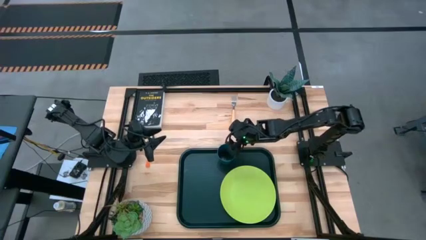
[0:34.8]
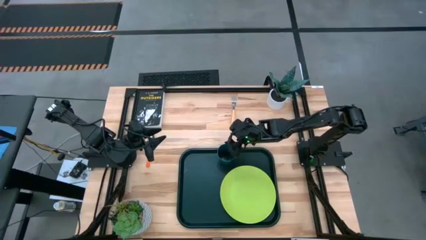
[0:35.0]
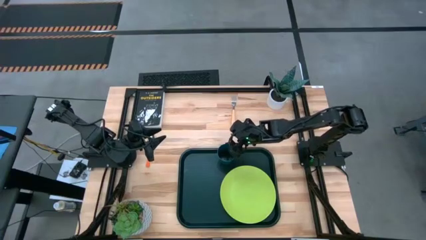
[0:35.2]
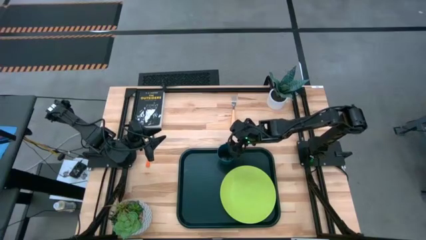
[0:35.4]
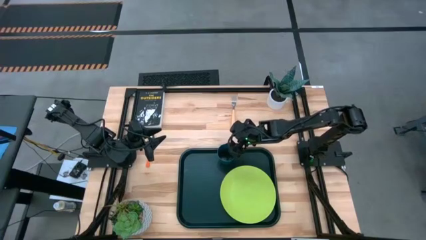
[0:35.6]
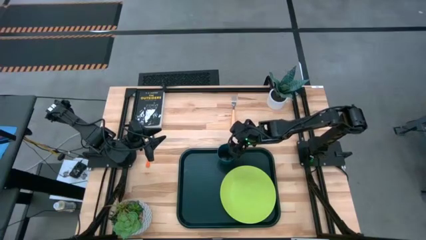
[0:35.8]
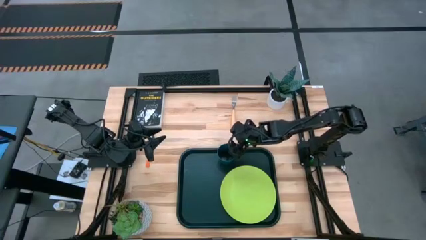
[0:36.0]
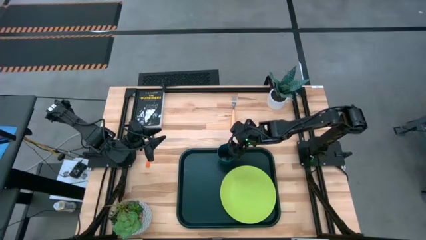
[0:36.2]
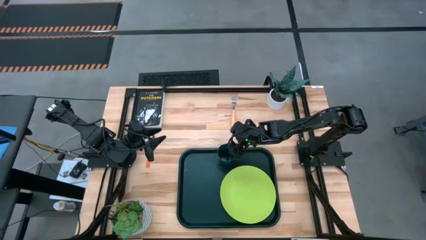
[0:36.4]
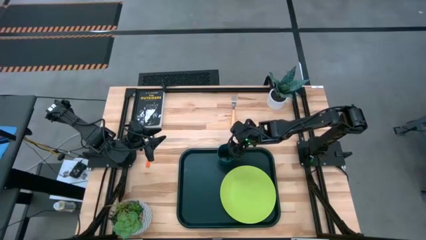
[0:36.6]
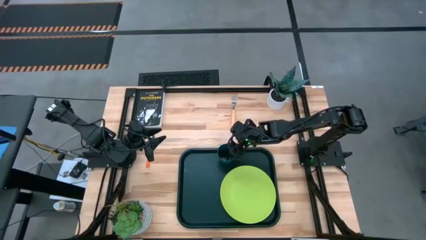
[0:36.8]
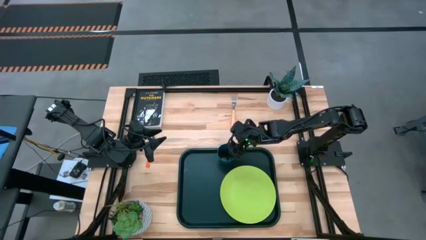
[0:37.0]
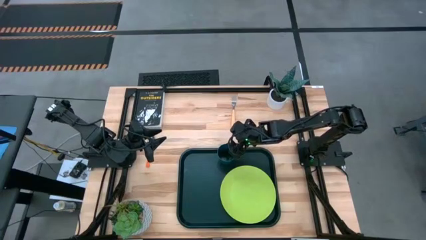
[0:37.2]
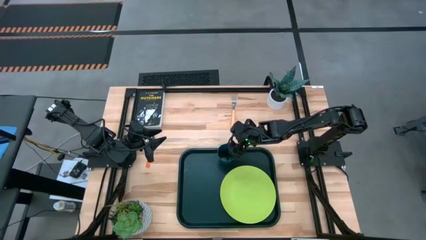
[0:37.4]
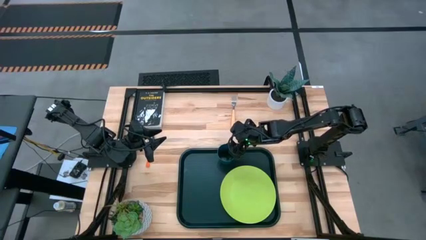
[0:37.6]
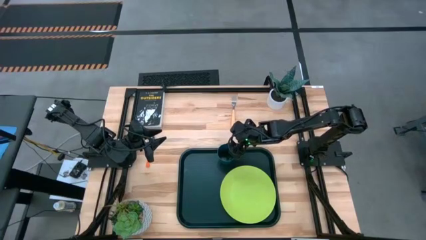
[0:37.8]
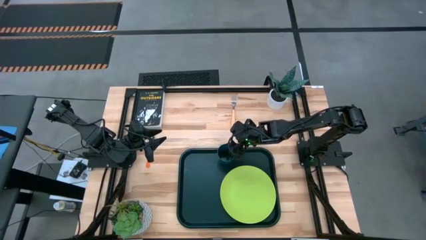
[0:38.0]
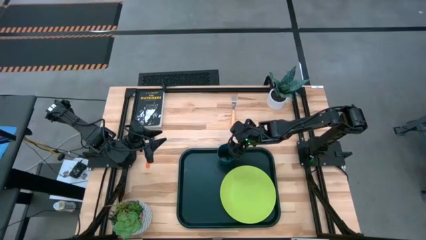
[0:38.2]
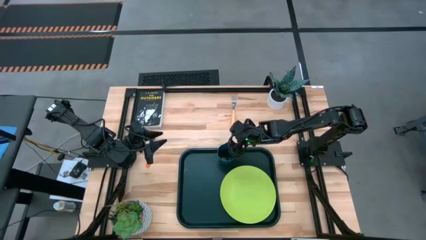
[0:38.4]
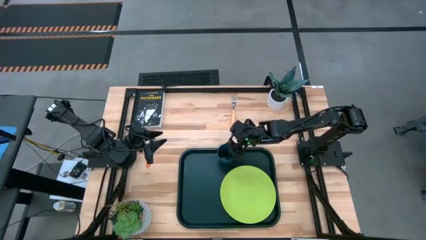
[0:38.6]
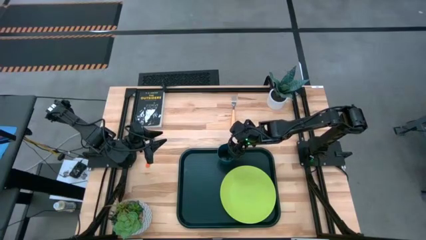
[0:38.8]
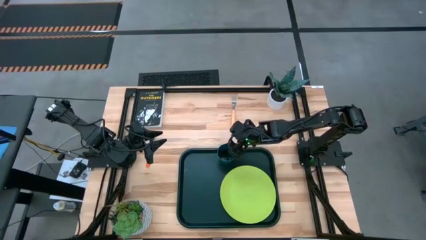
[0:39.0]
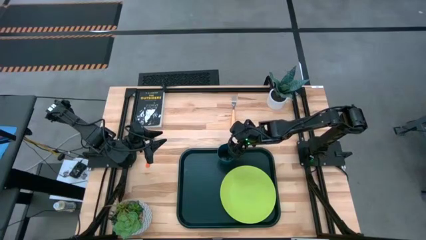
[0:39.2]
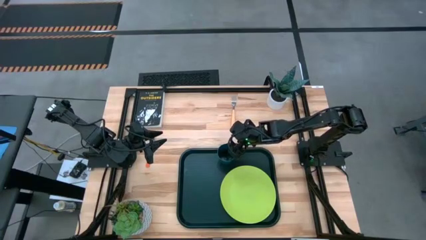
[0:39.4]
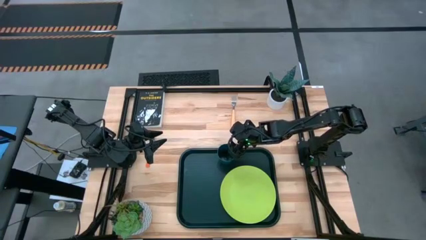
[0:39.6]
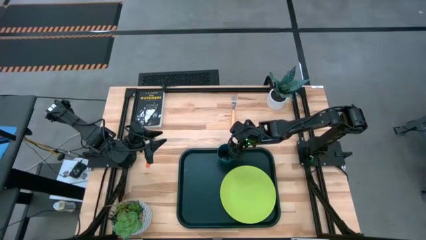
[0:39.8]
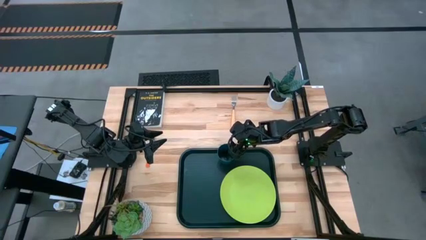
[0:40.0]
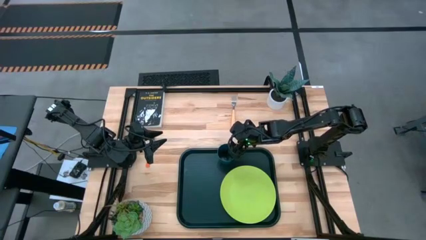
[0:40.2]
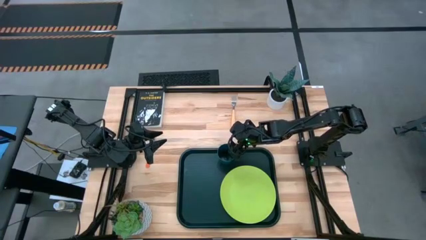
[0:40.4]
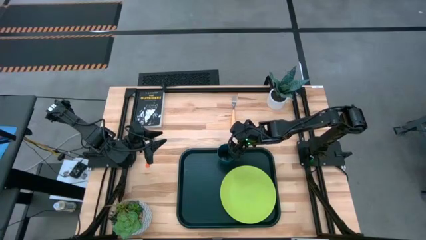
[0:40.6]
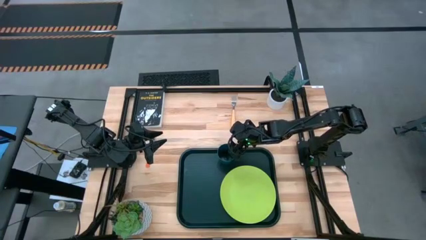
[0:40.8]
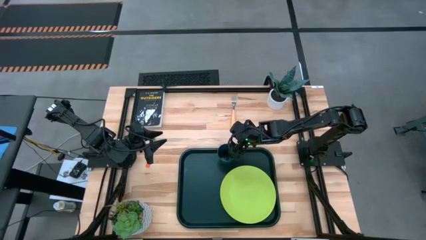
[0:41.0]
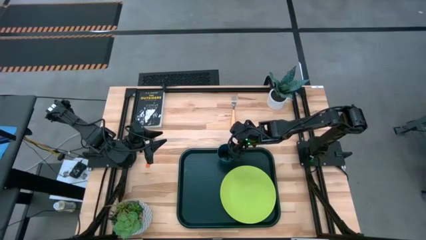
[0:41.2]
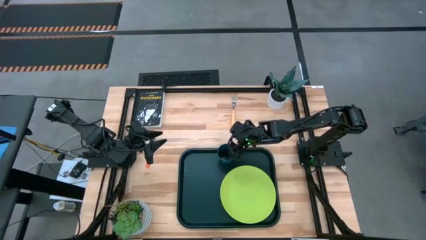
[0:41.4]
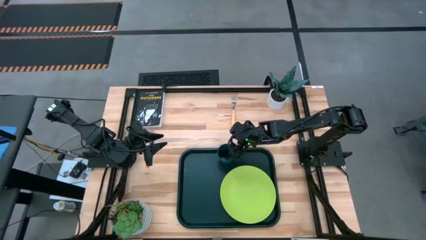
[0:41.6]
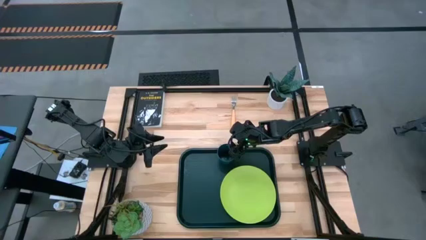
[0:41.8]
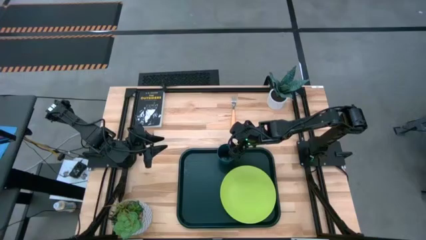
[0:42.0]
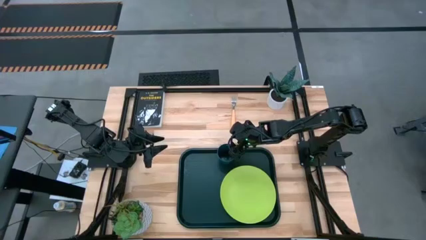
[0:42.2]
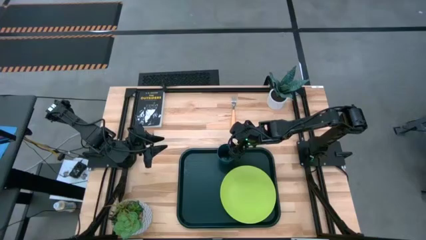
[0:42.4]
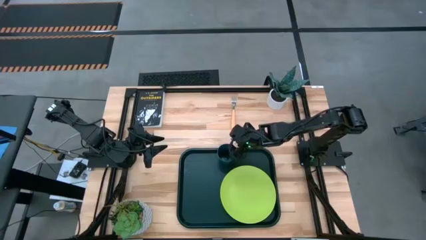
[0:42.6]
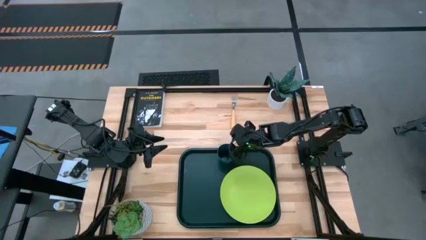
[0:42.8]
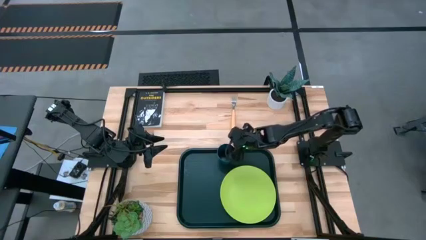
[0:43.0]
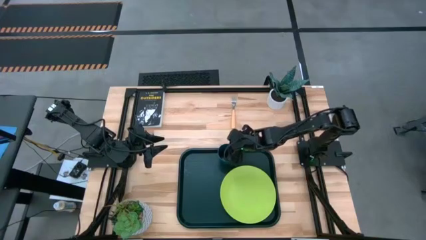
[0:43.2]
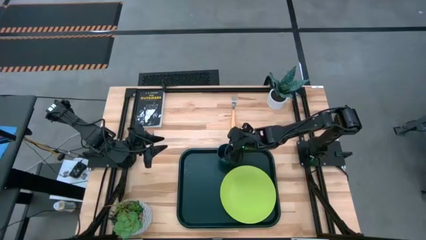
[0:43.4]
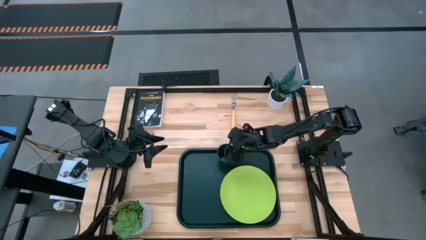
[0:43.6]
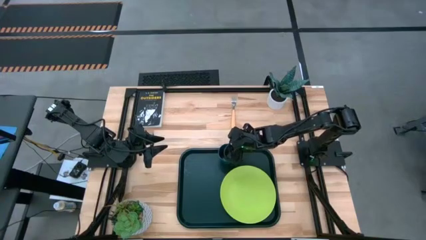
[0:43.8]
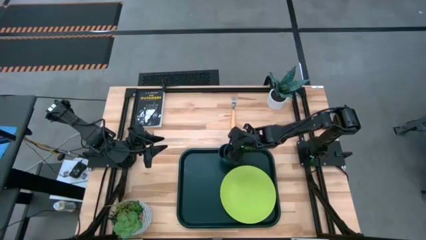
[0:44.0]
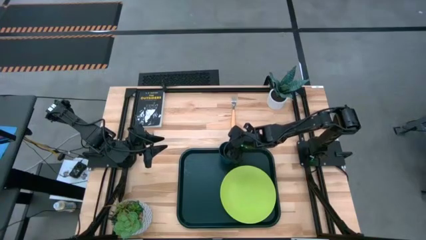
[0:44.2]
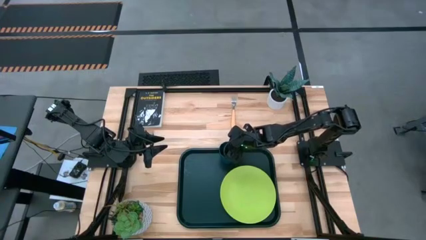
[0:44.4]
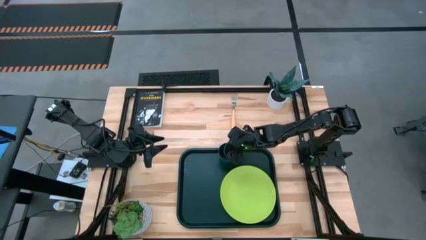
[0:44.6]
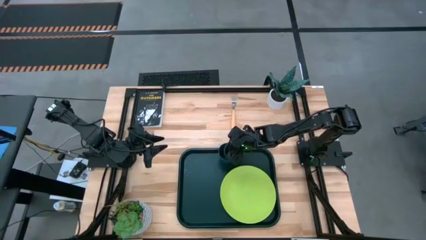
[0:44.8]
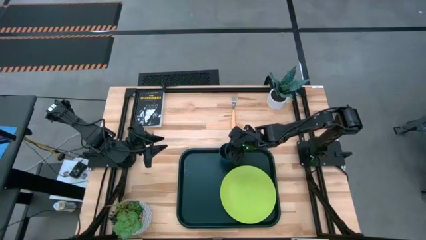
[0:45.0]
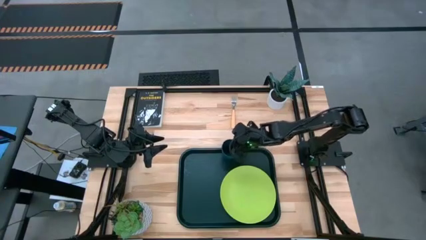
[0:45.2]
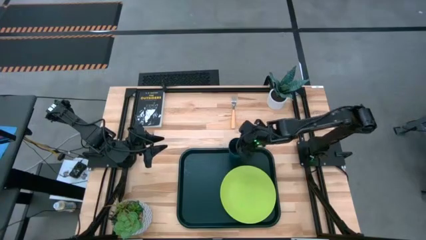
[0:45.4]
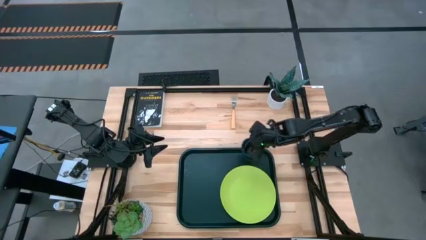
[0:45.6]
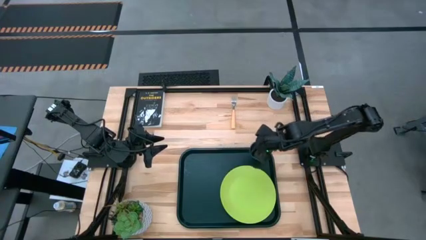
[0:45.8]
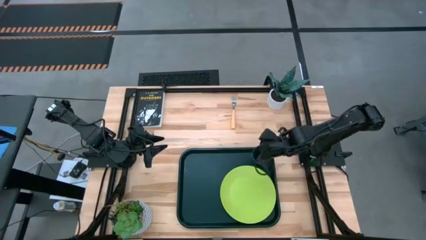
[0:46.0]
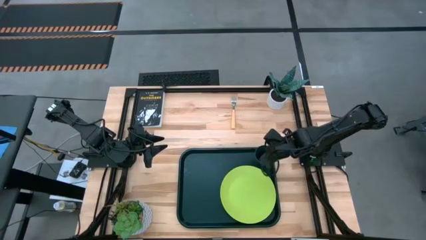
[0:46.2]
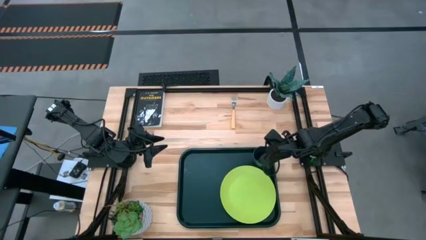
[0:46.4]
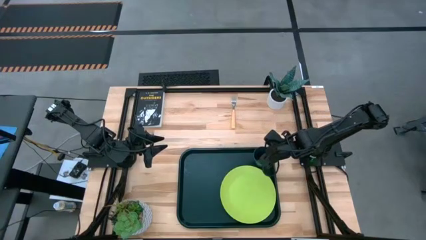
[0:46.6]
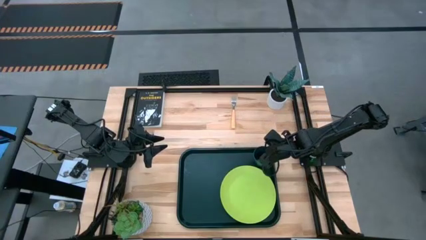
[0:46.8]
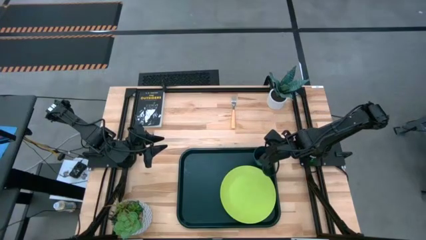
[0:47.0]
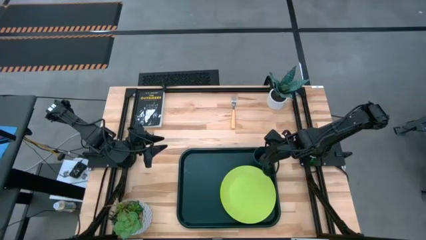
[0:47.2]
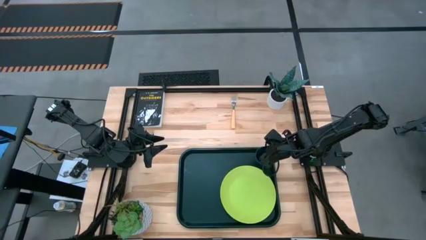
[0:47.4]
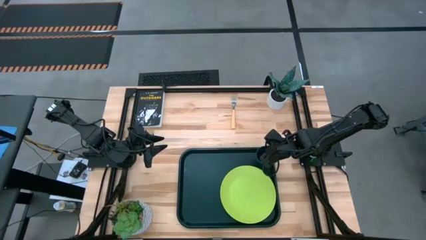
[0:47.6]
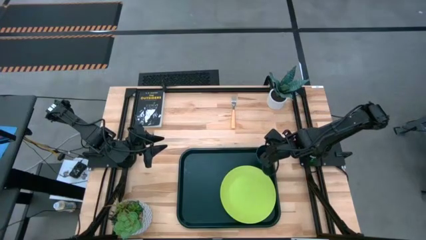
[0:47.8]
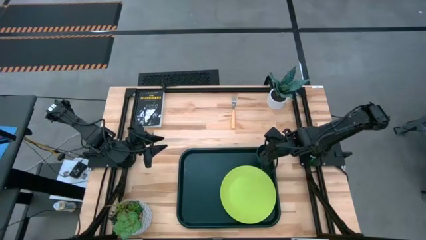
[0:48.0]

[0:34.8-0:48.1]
Task: Pick and place plate/cup/fork/spoon on tray
Put the dark blue cup on the black serving tray to the top right of the light green plate

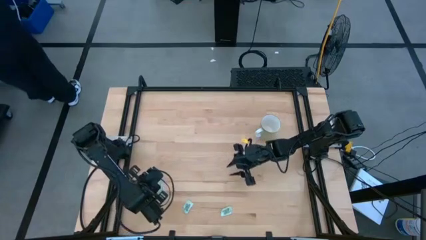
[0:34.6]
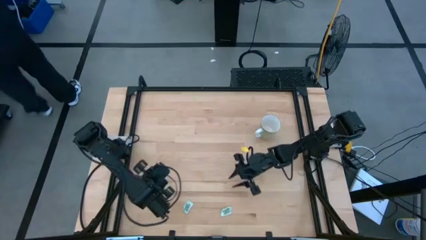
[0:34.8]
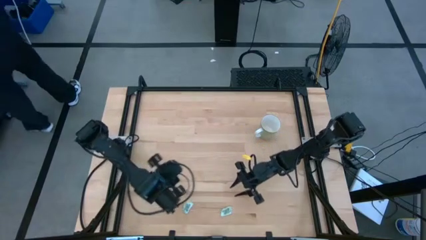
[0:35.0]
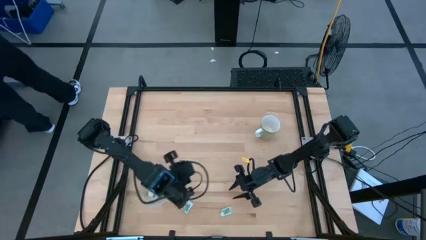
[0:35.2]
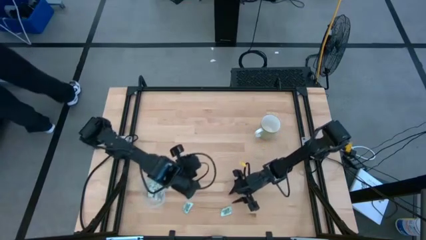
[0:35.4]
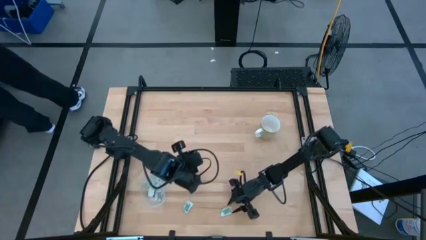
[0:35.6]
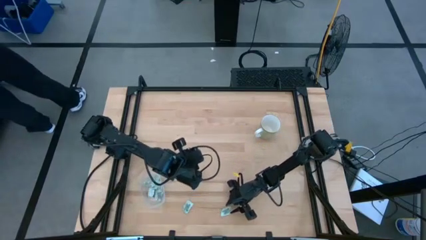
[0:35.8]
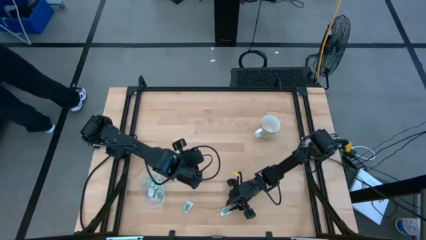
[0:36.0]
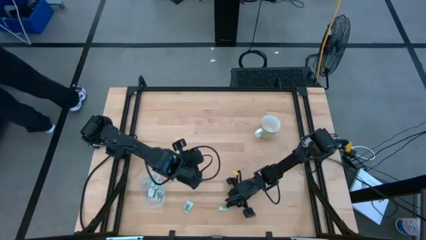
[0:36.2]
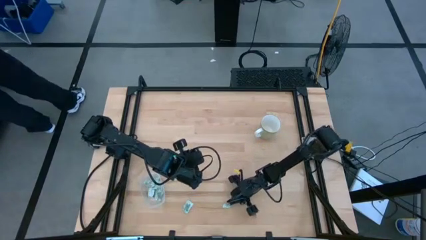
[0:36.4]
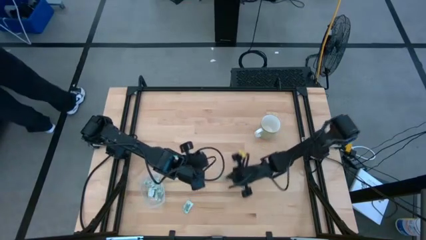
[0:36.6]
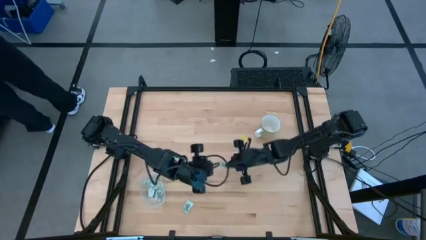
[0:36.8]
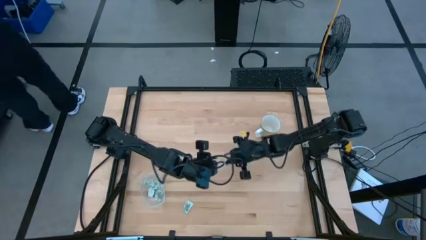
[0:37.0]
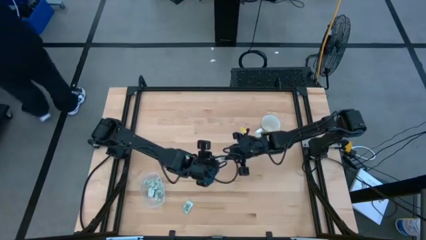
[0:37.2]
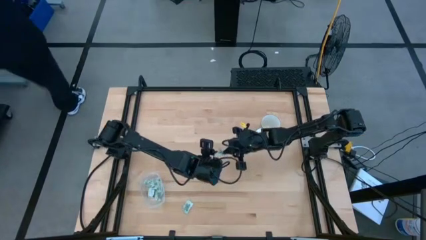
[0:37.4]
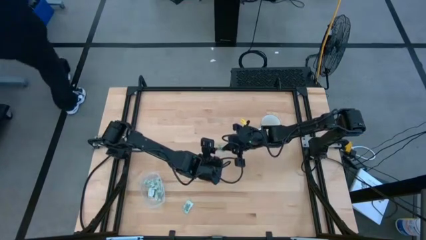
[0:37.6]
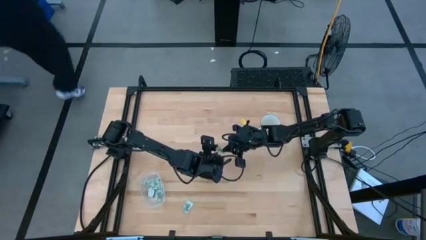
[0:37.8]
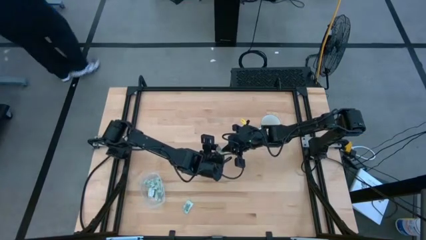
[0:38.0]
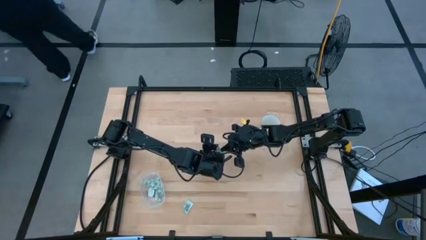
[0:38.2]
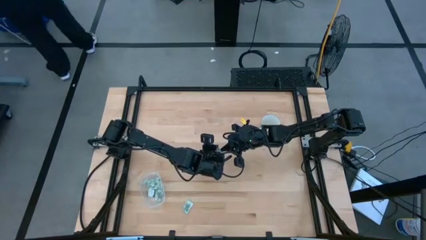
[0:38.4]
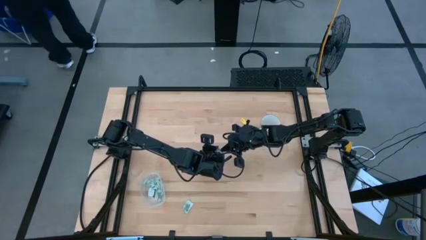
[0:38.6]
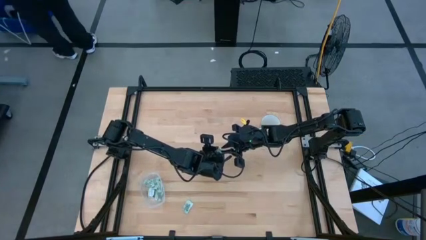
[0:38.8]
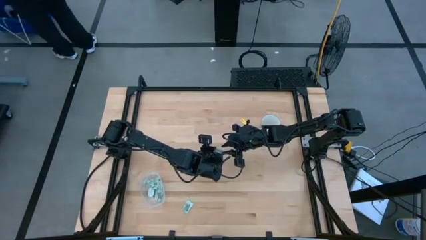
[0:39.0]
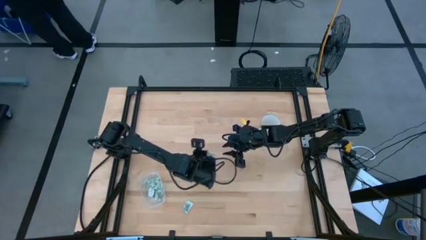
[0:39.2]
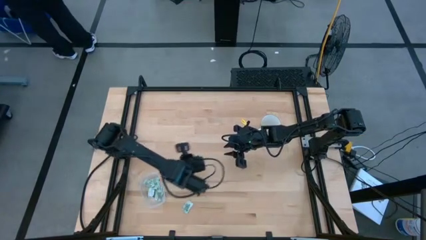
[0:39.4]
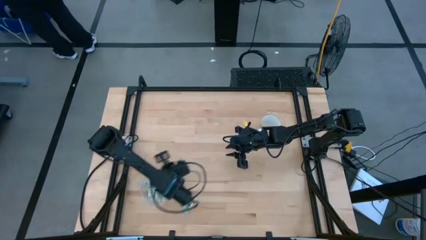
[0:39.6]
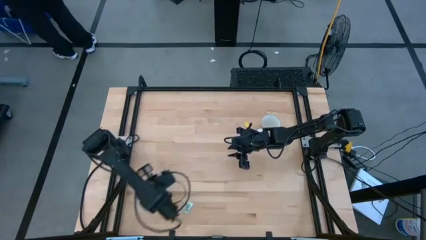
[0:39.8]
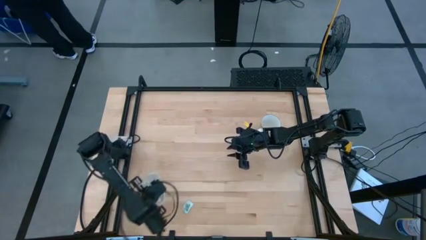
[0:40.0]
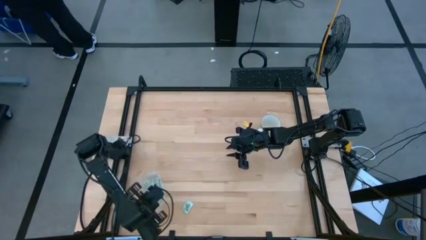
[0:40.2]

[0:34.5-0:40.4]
Task: Pick and place Stevia / Truvia into bins
Put the stevia packet into the transparent bin
